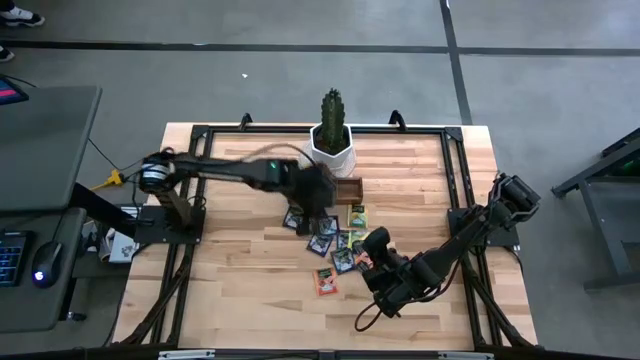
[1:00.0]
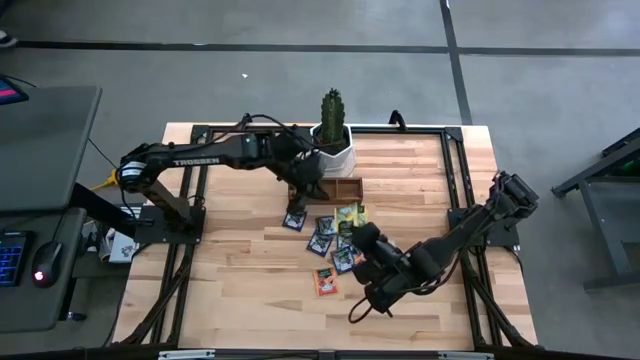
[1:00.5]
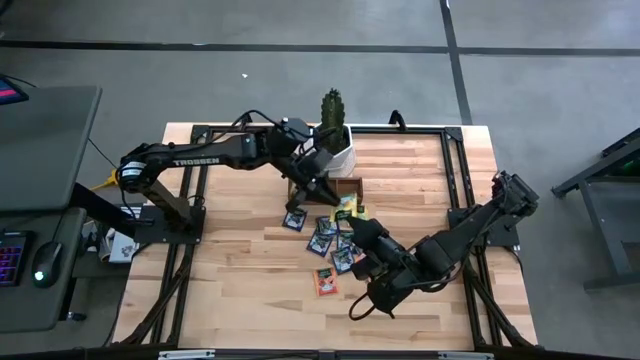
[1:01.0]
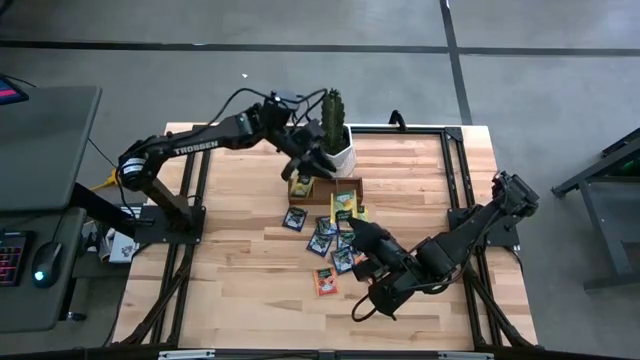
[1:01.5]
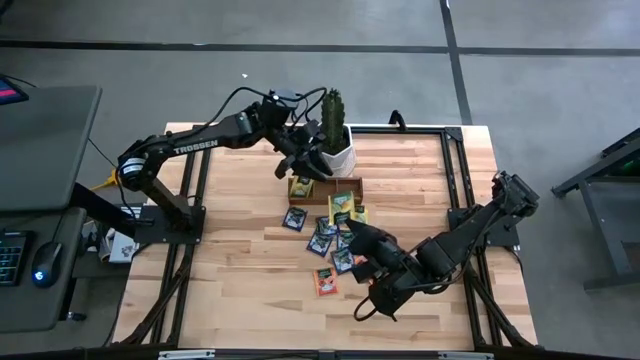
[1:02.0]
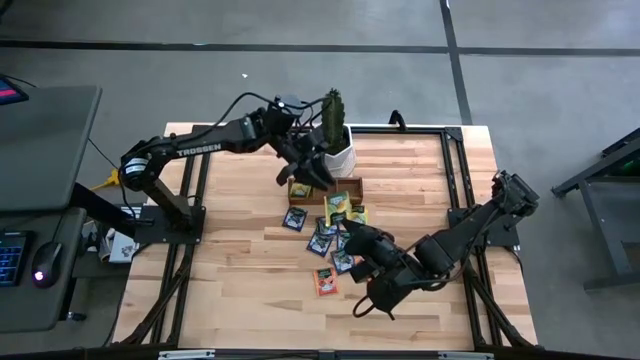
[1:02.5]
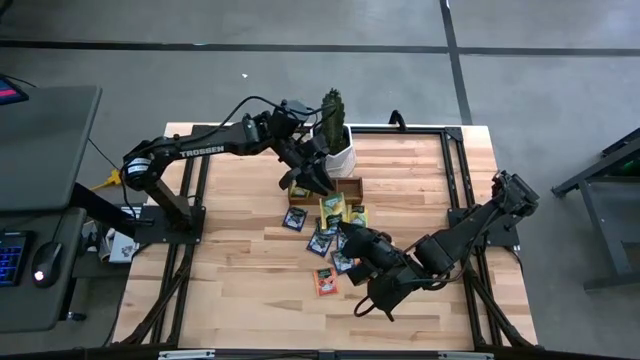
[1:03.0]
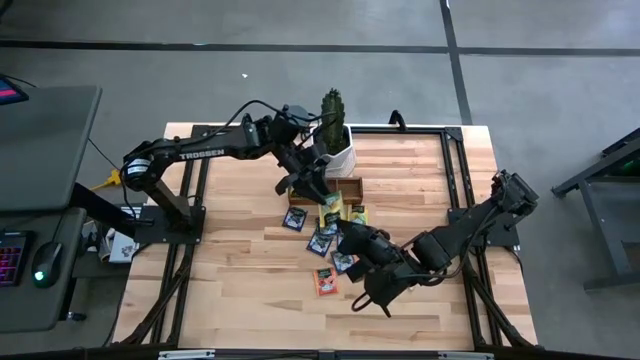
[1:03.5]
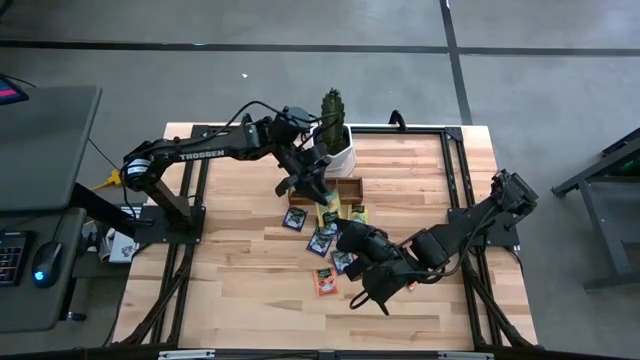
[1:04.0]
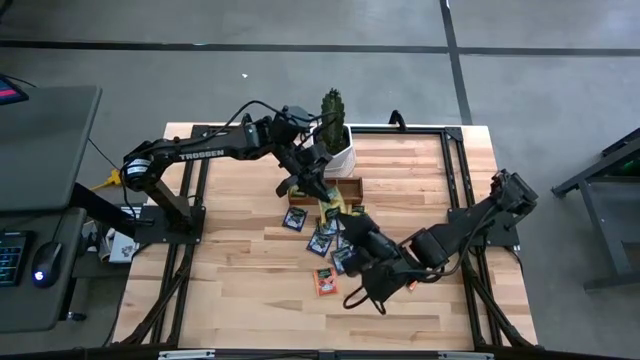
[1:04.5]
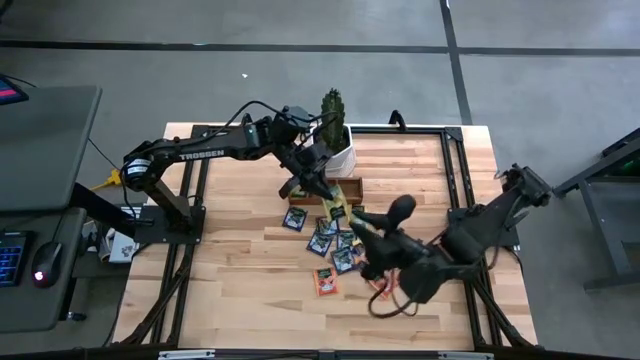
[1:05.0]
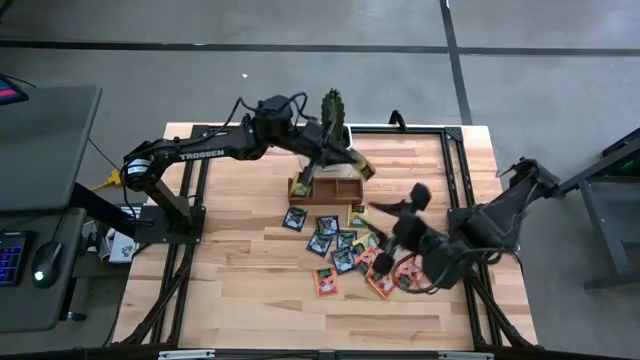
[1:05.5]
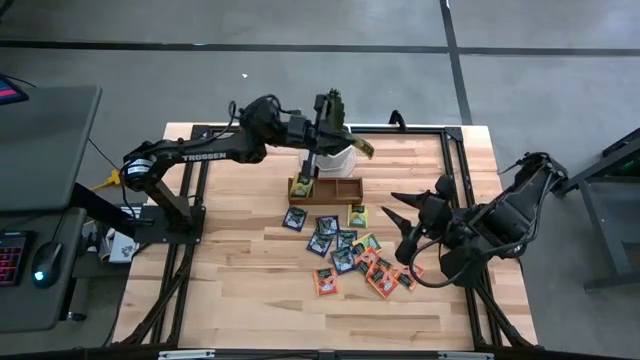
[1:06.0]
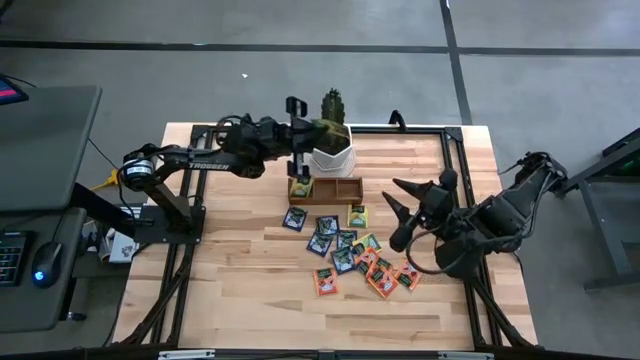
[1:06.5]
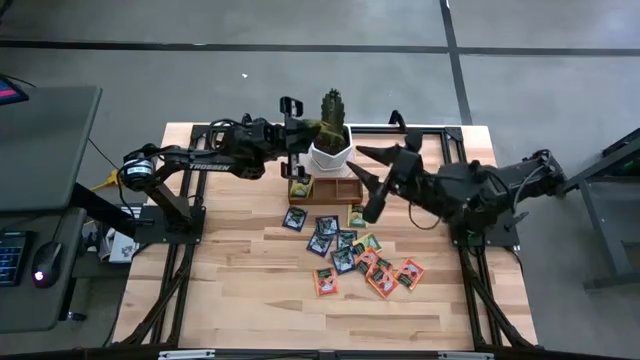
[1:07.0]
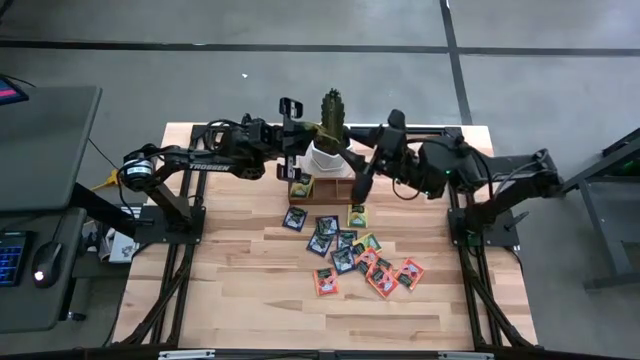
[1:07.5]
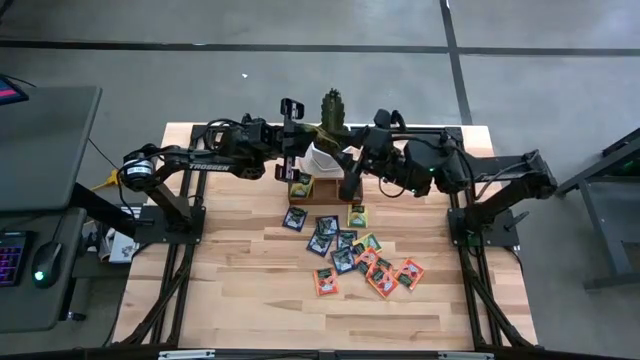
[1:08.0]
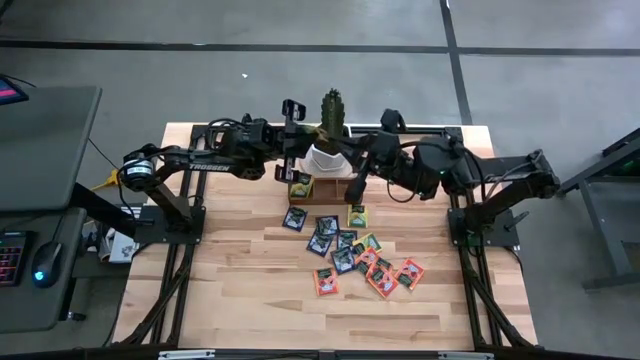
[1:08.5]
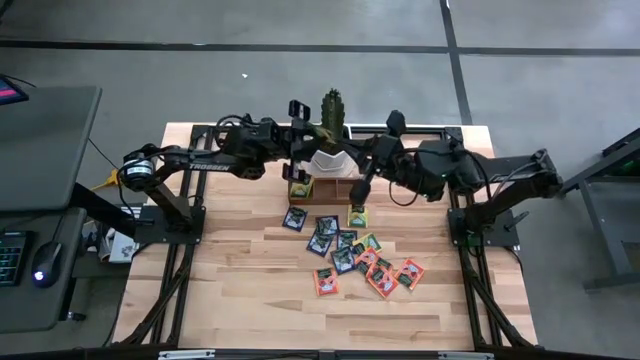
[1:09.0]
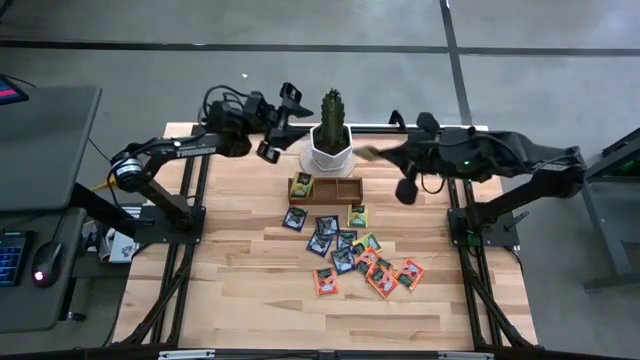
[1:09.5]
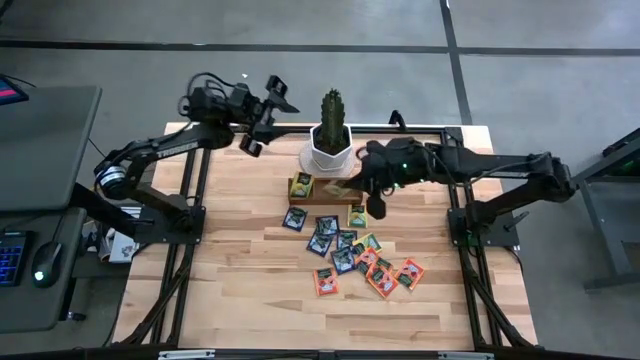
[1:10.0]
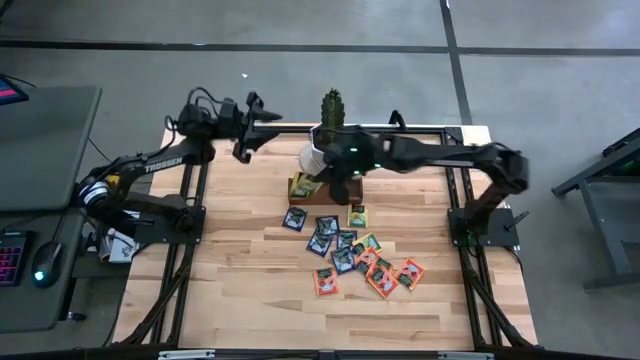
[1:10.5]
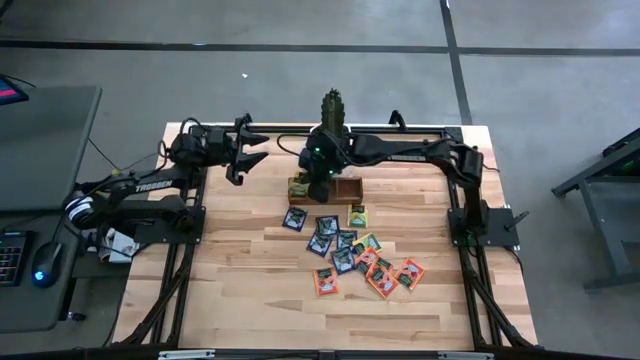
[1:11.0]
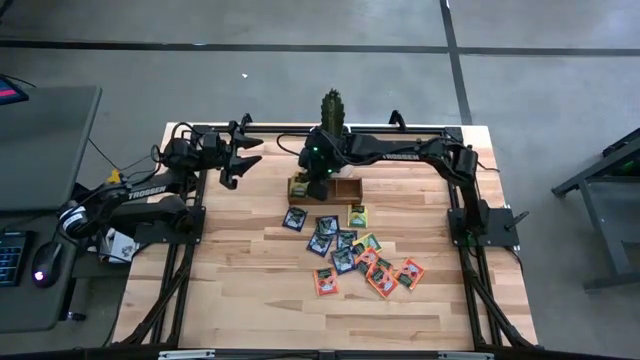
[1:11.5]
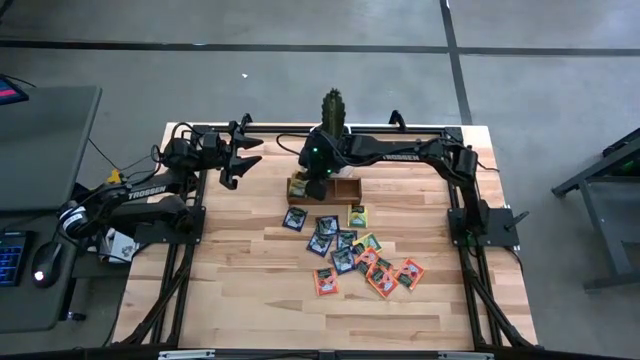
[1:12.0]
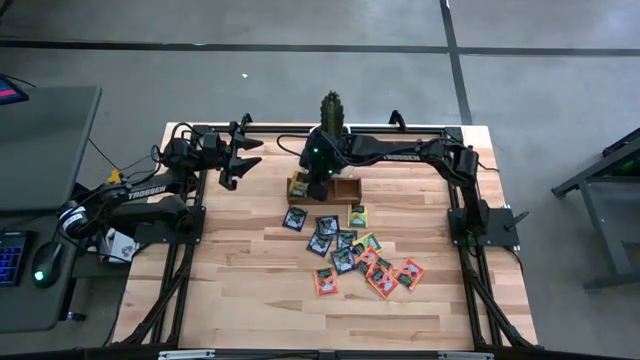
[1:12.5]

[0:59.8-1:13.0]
Task: Pick & Place Tea
Put the yellow tea bag into the left section of the wooden organizer

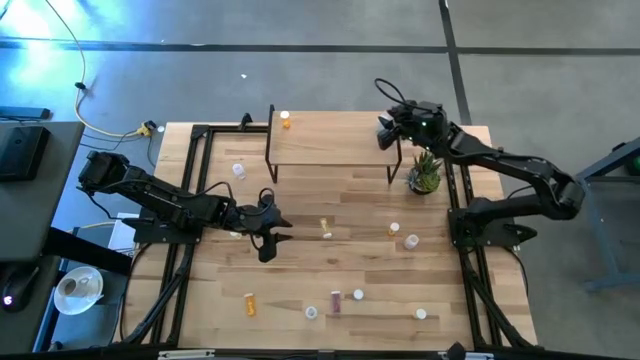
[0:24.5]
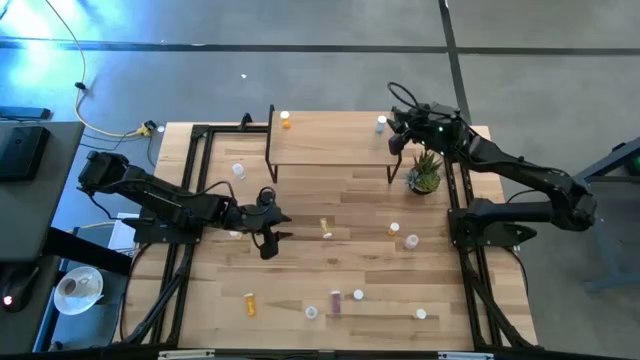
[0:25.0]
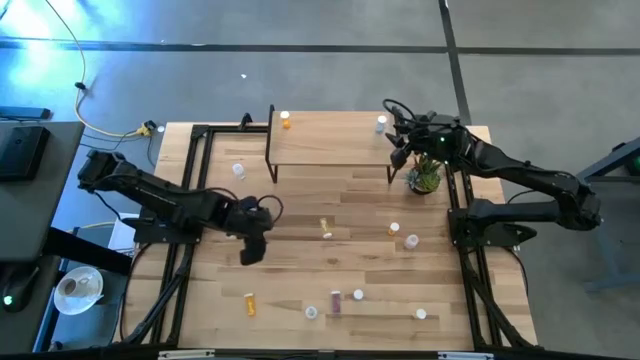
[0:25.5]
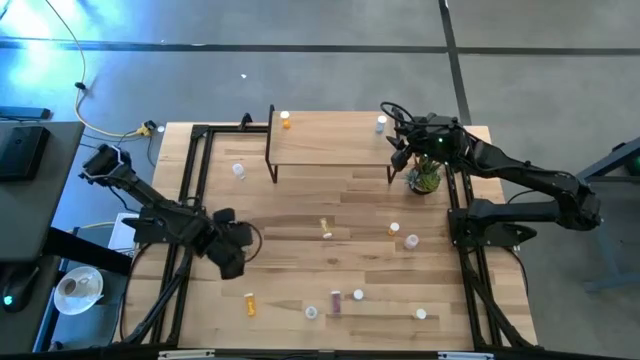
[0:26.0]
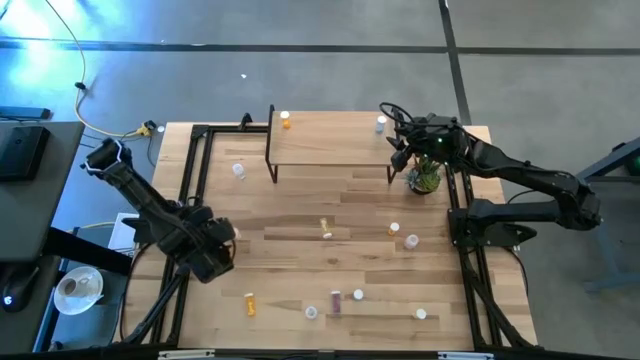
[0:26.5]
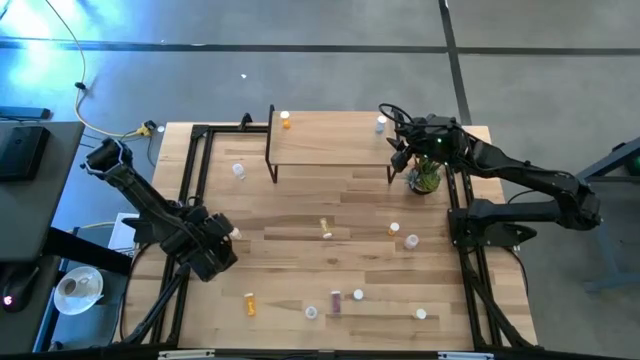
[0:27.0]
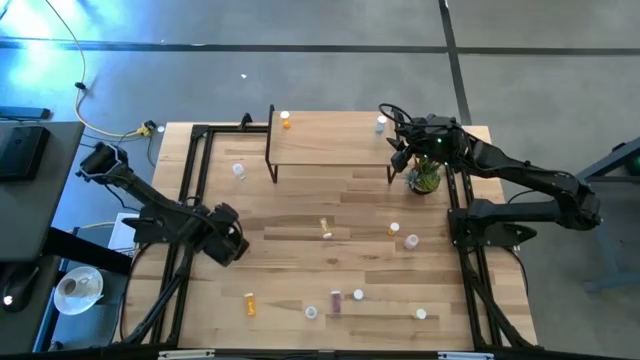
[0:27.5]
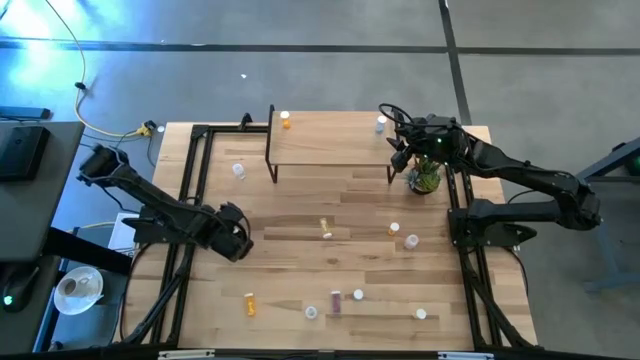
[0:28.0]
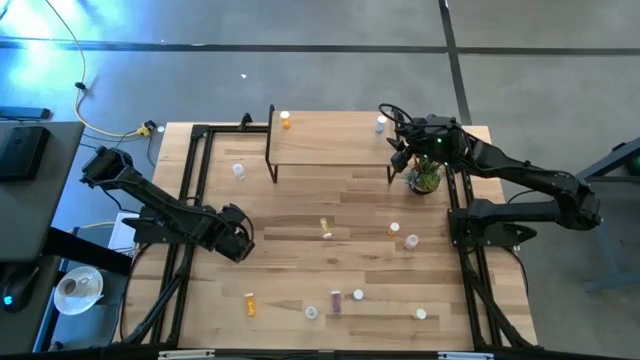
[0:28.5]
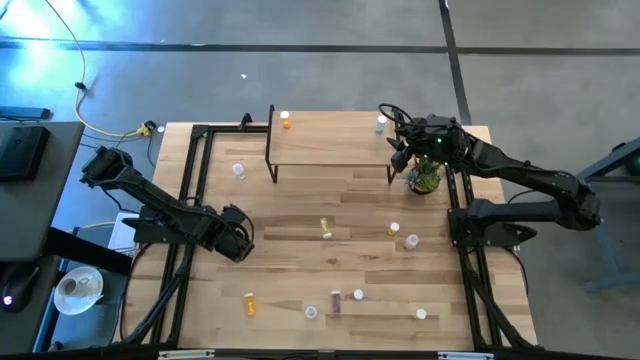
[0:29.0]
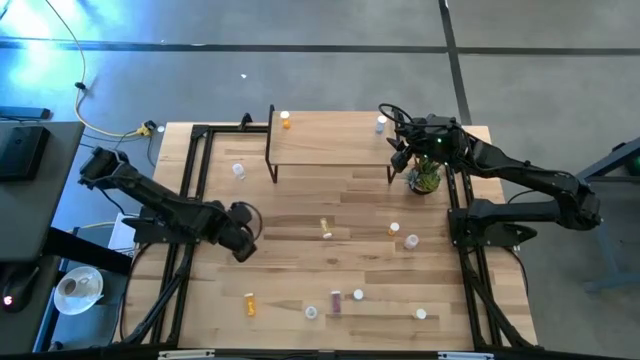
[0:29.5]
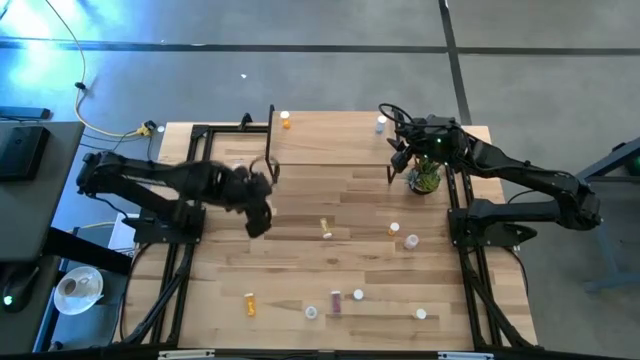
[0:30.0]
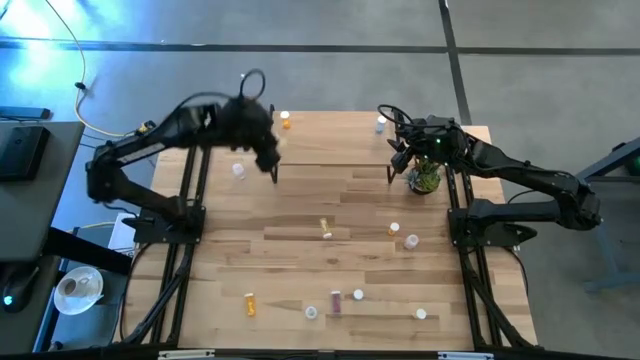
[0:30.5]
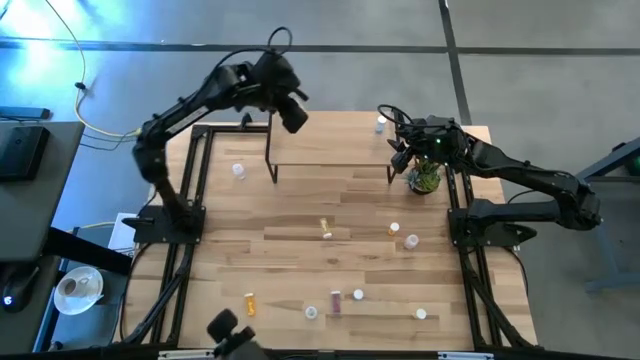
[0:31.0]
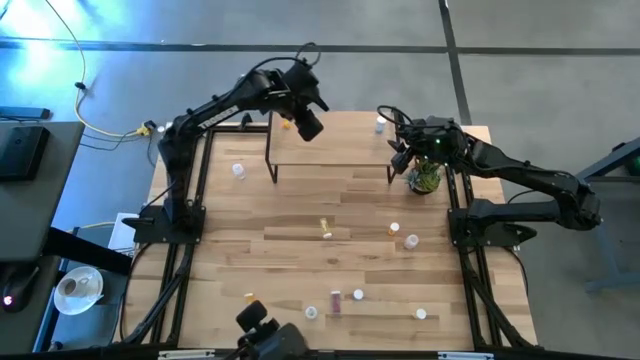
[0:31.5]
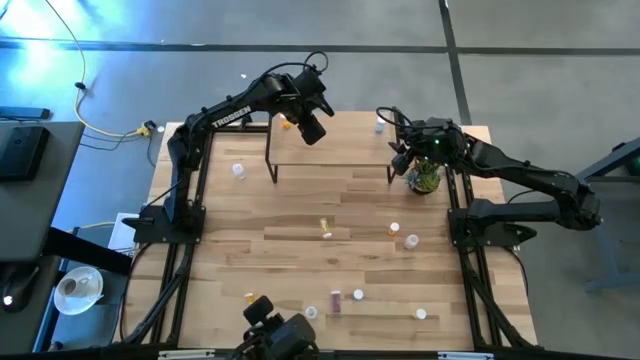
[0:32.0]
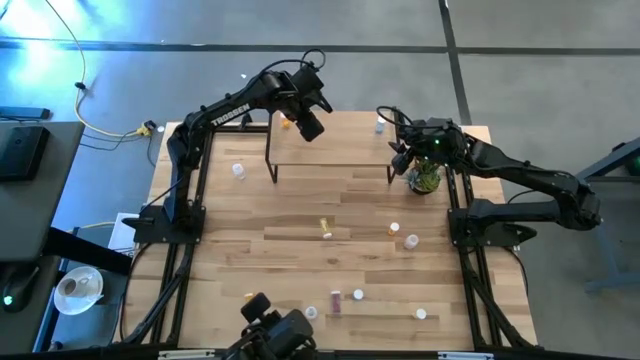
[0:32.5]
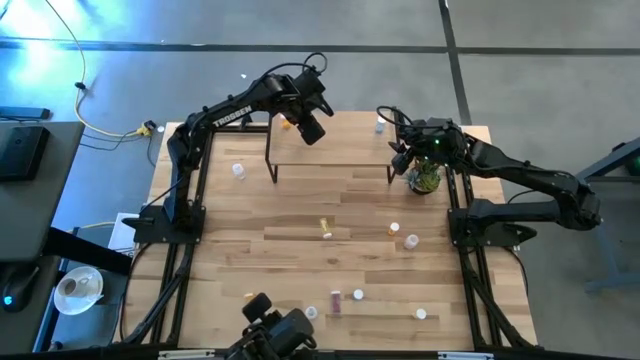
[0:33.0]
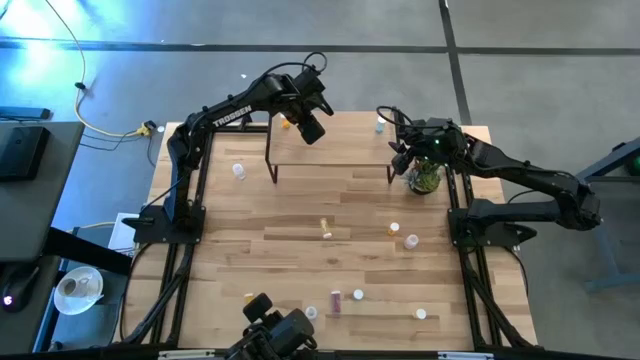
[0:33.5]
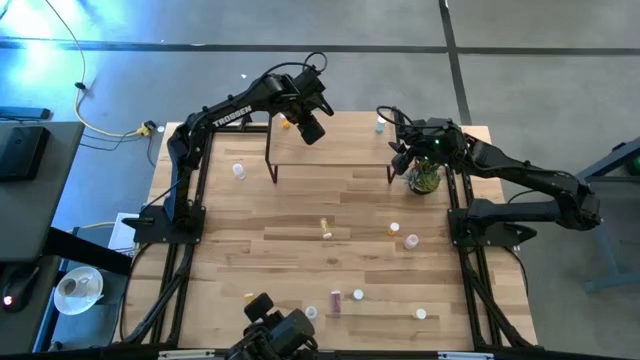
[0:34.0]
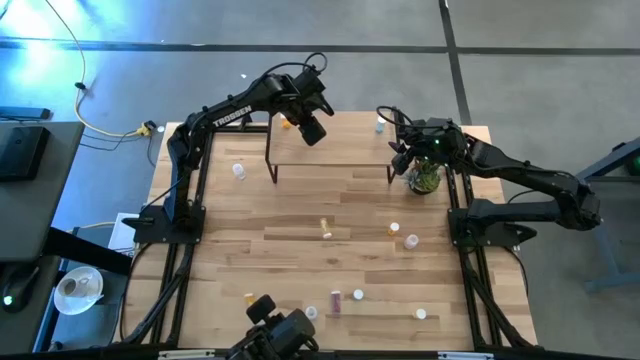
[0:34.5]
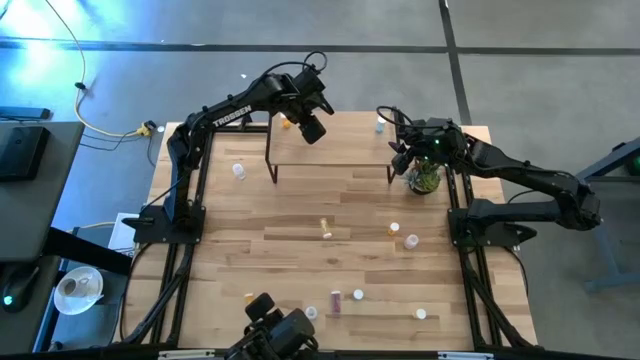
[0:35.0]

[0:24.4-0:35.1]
Task: Pick and place medicine bottles onto shelf by color
Put the top left yellow pill bottle on the shelf
